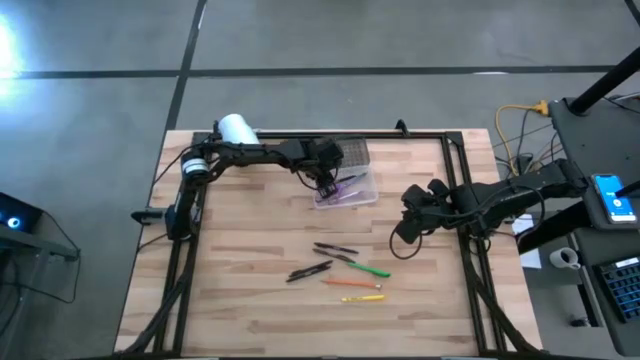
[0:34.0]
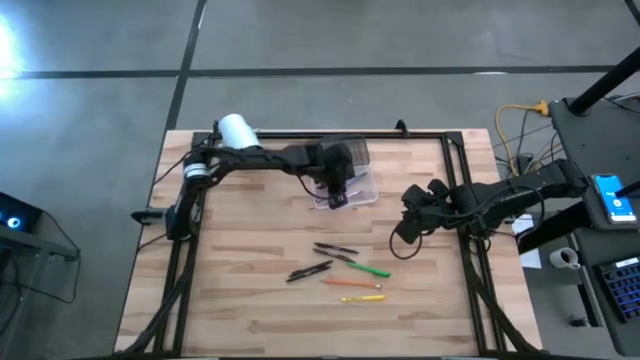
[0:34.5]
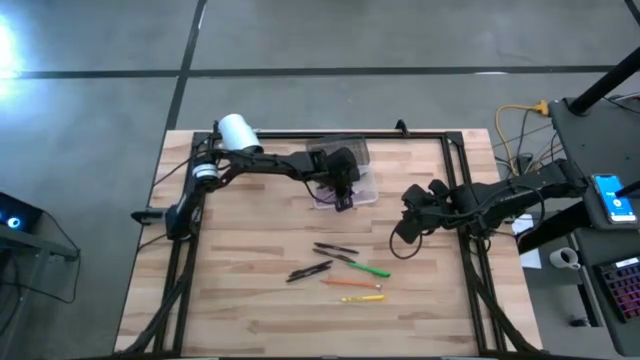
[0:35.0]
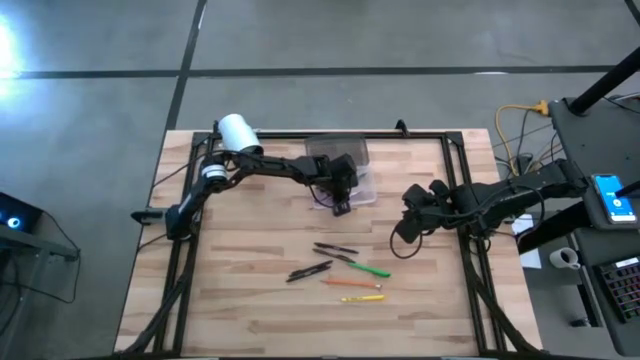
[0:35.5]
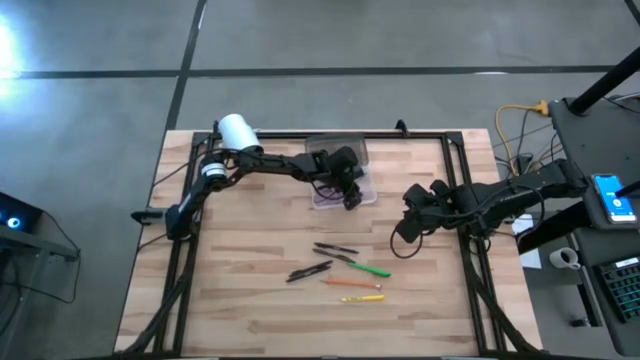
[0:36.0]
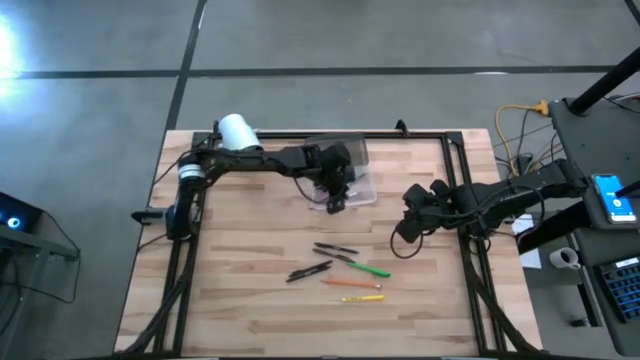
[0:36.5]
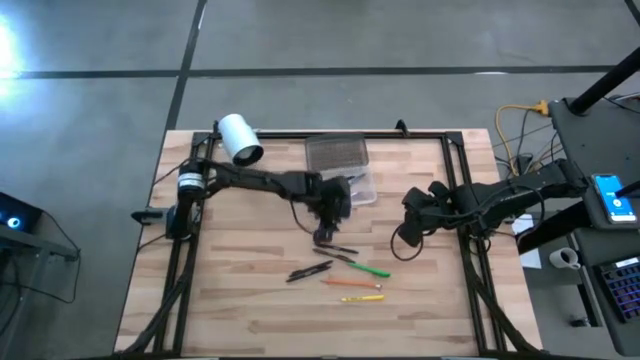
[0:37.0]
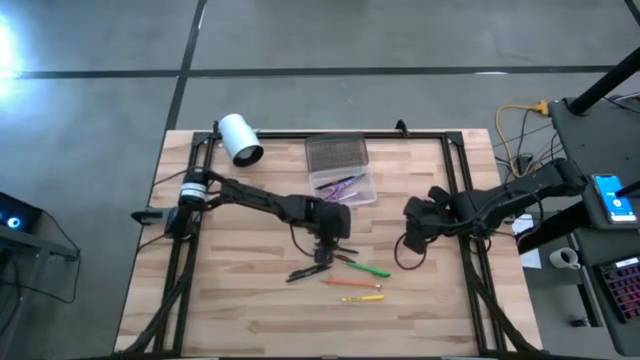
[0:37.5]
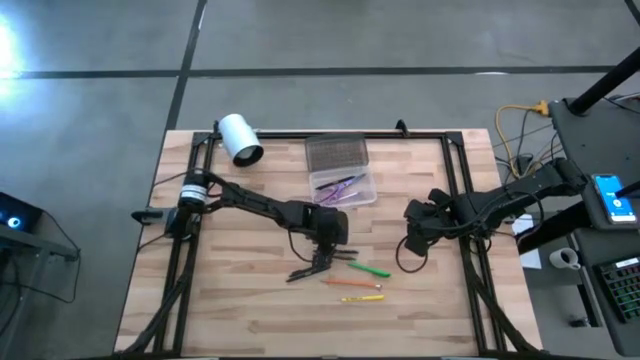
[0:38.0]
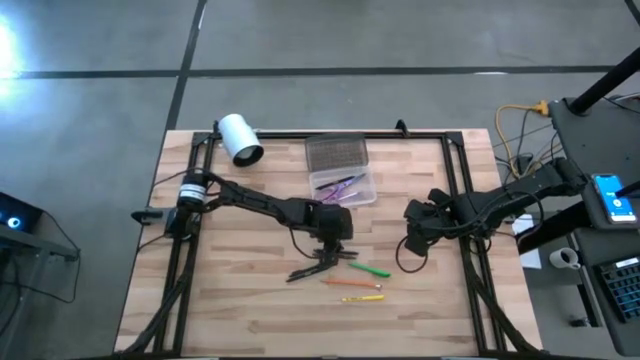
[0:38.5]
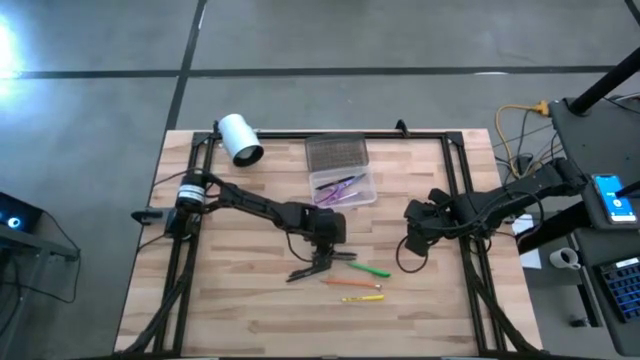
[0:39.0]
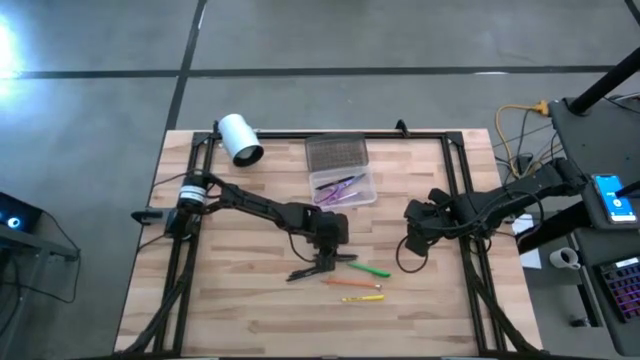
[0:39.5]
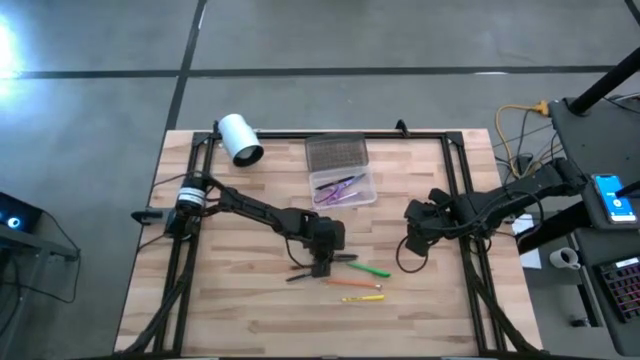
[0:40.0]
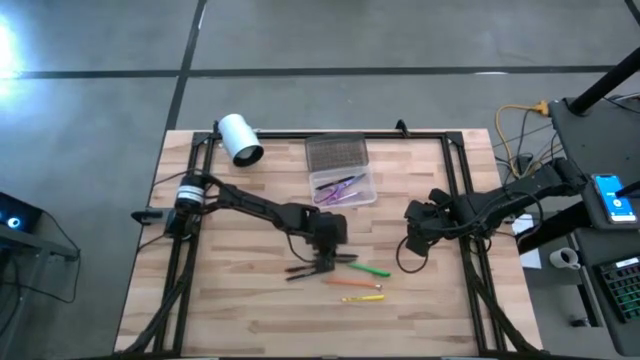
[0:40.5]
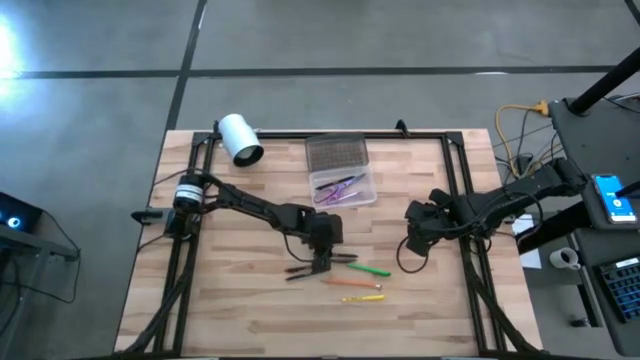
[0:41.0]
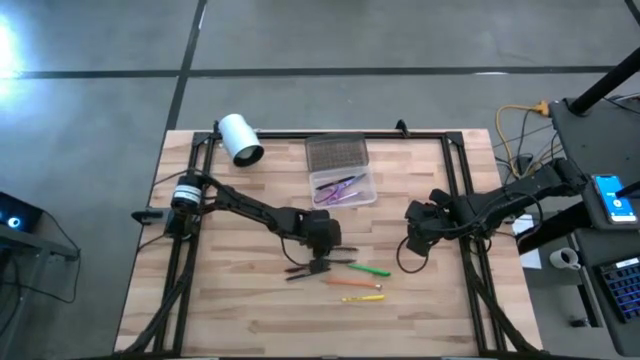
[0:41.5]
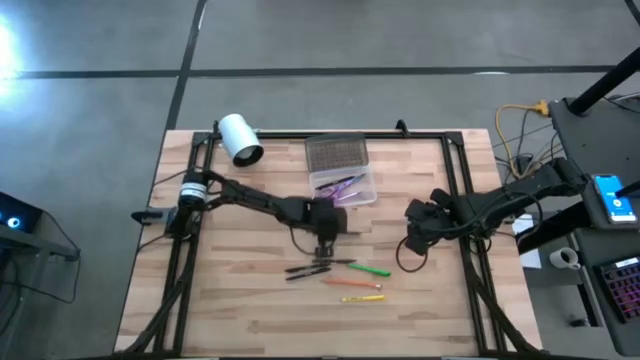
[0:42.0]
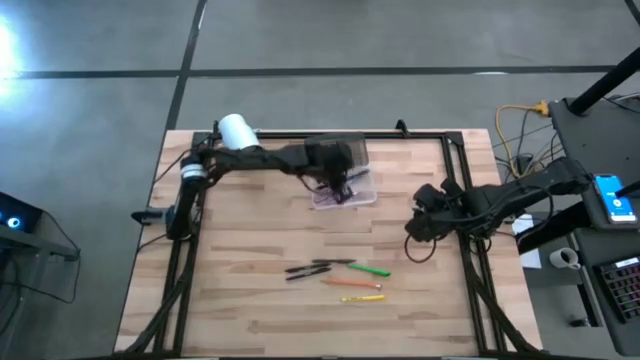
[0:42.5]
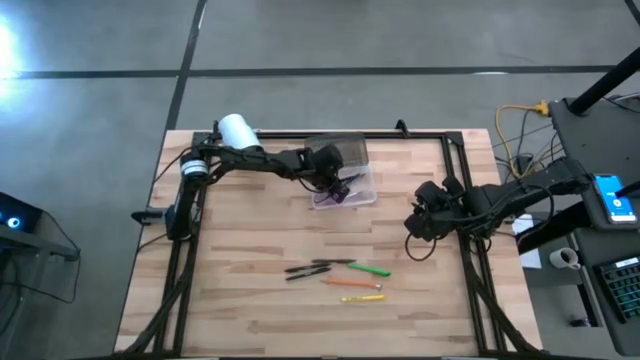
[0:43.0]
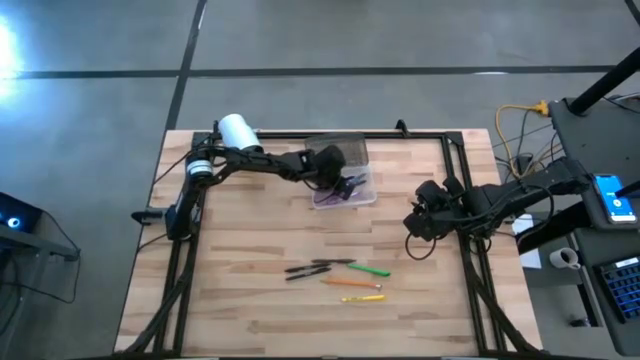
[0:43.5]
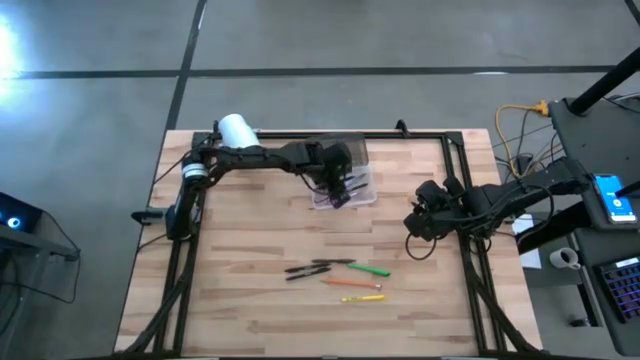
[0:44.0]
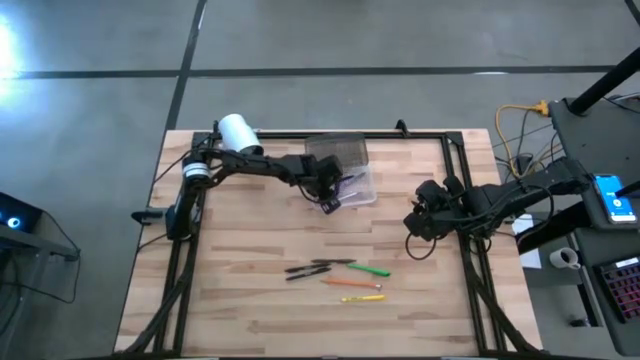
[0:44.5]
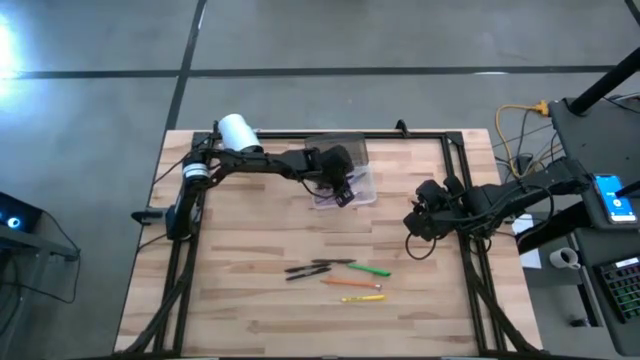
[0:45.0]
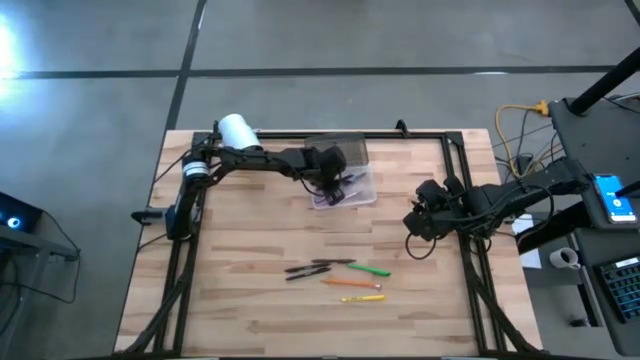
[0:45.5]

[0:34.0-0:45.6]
Task: Pick & place school supplies into a supply box
Put the top black pen into the supply box

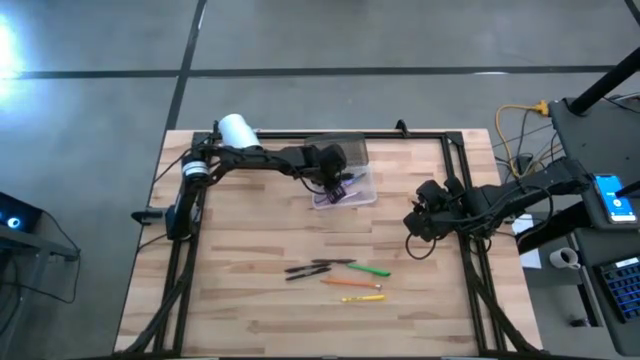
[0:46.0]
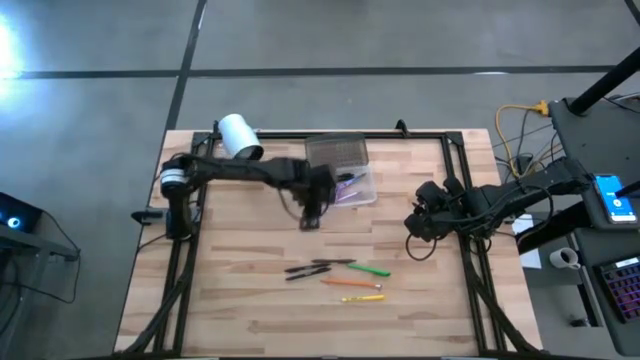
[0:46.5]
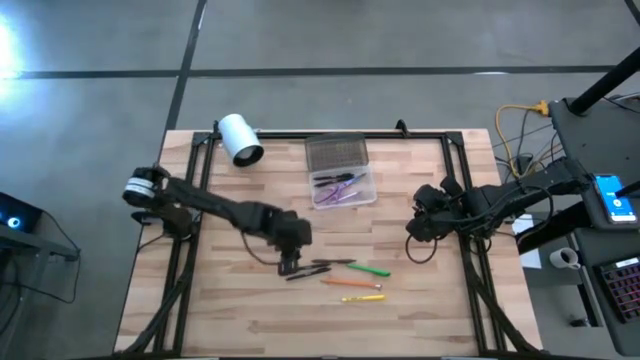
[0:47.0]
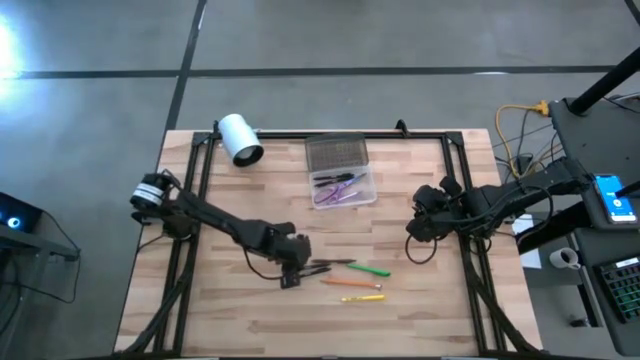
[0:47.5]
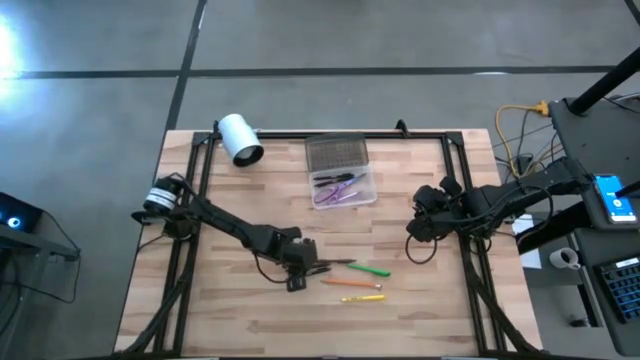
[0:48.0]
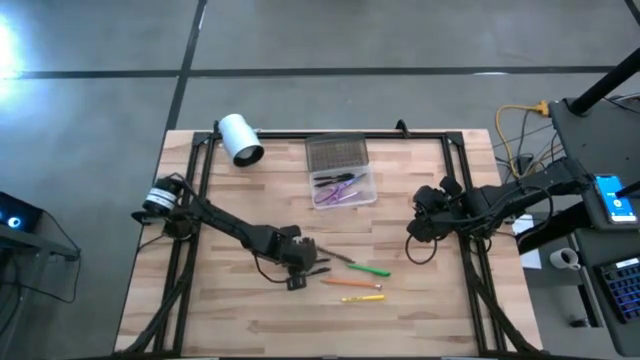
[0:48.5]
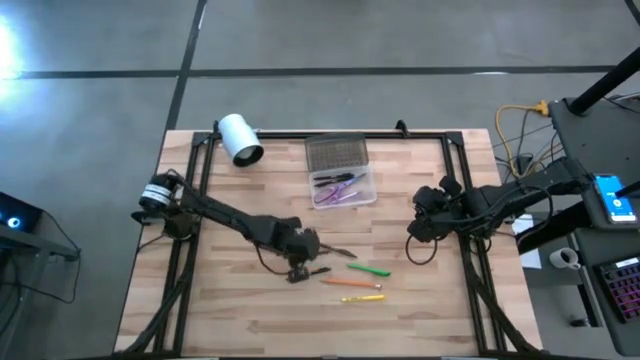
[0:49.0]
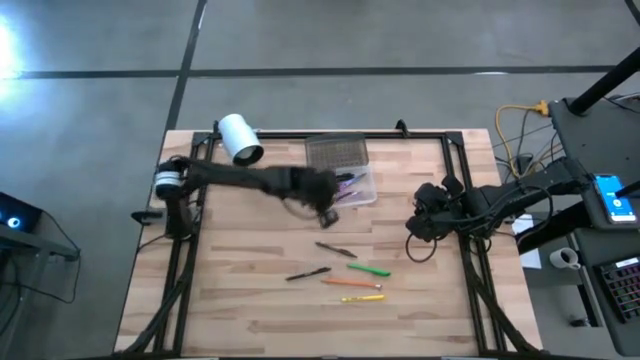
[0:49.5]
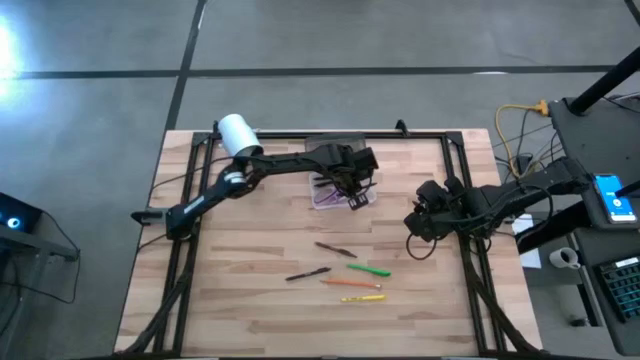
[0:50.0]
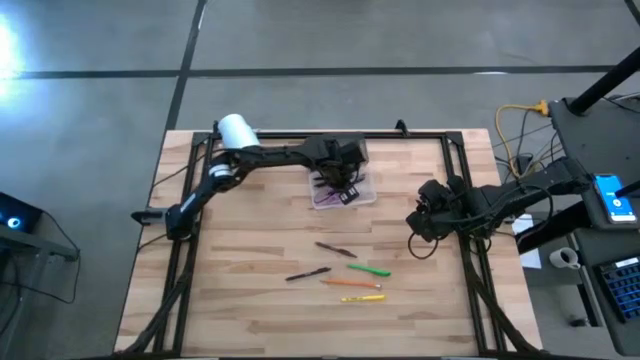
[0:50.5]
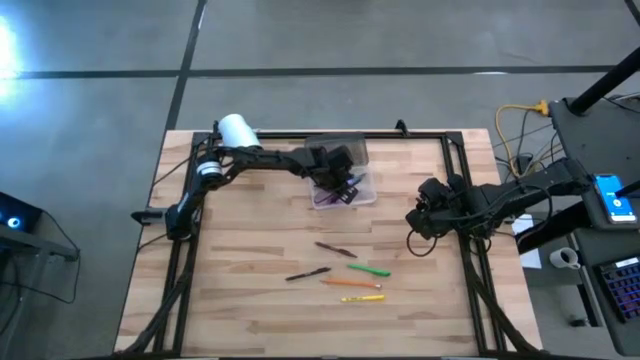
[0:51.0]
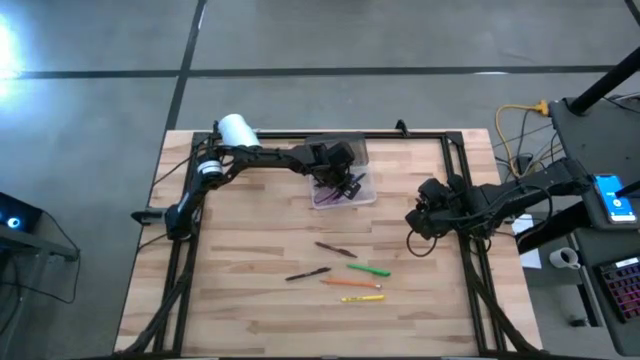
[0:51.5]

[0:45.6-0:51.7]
Put the top black pen into the supply box

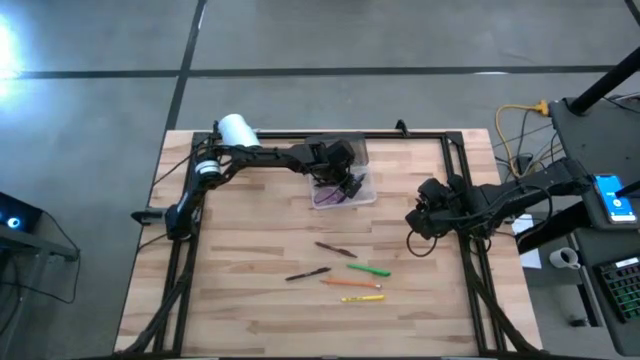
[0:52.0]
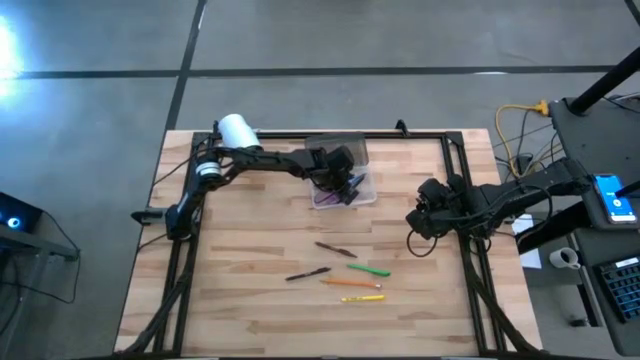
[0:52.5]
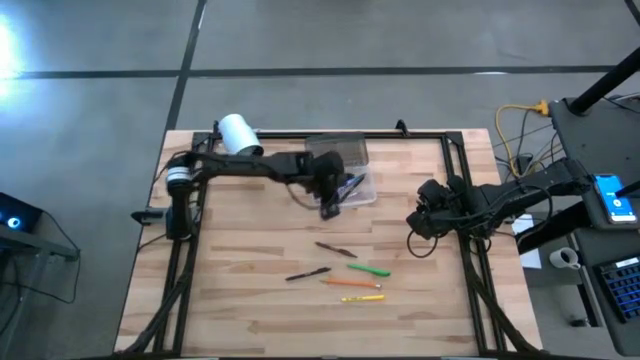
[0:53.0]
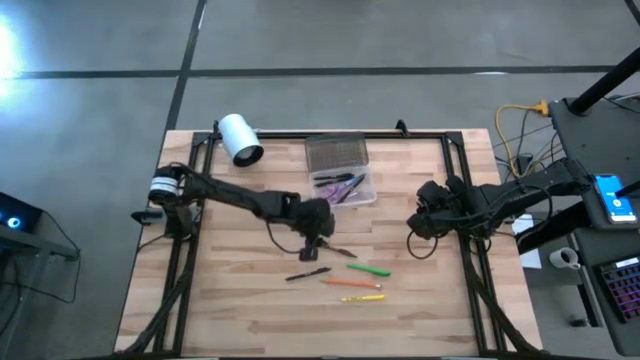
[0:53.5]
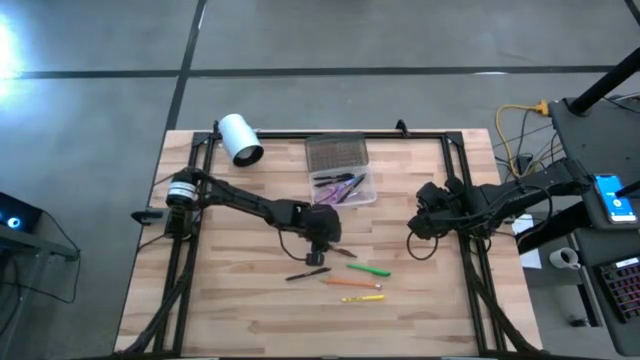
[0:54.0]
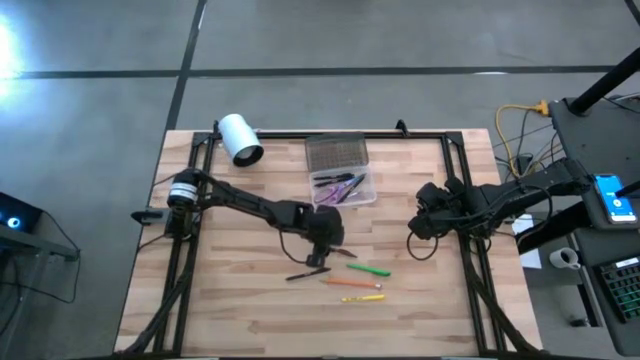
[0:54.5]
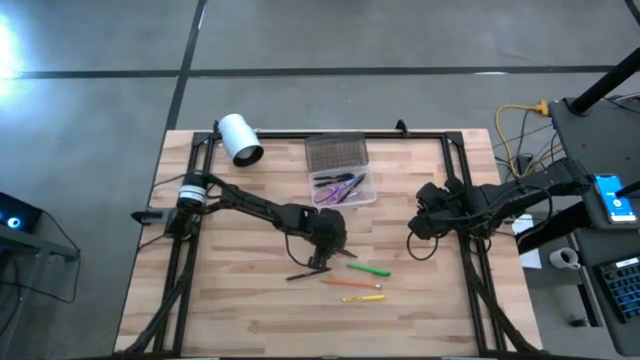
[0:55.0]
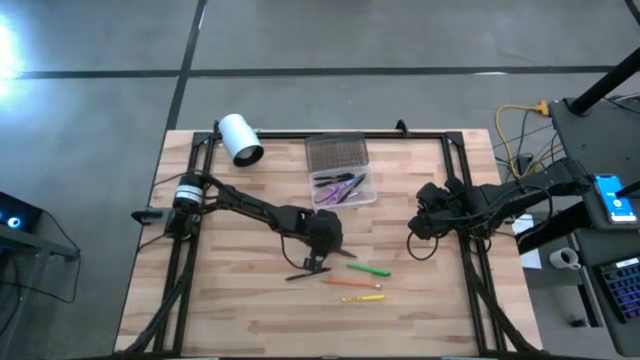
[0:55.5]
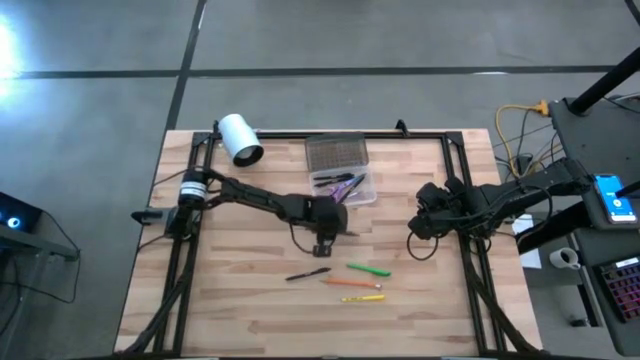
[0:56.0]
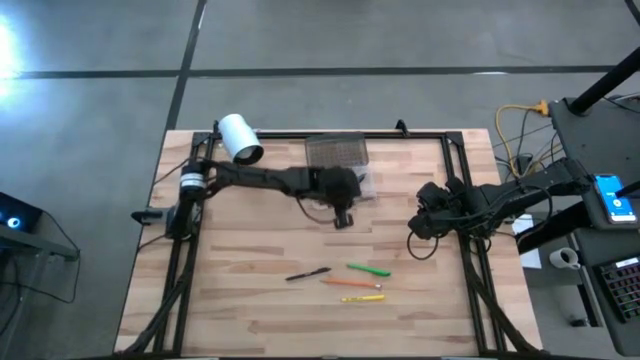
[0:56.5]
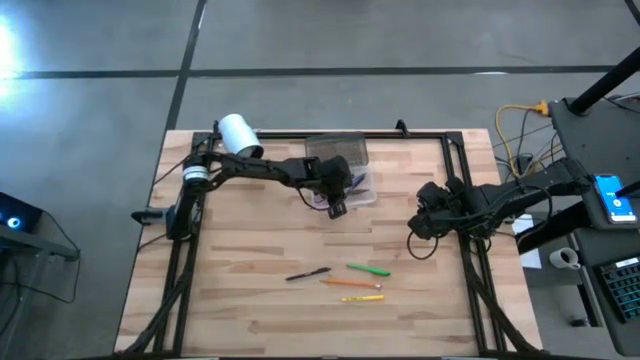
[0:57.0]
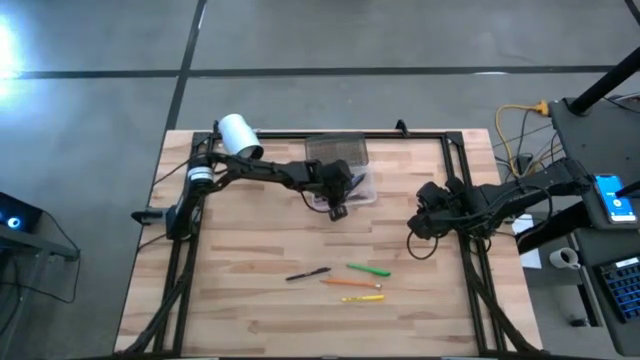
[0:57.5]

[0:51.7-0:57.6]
Put the brown pen into the supply box
